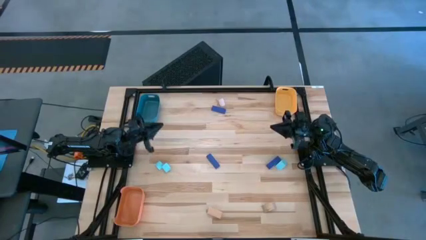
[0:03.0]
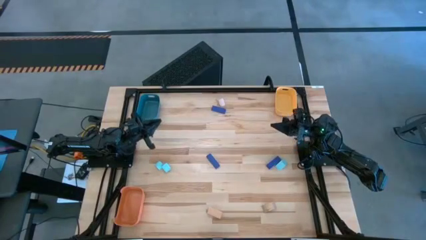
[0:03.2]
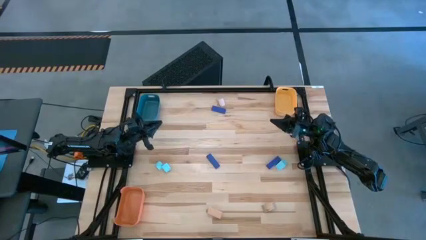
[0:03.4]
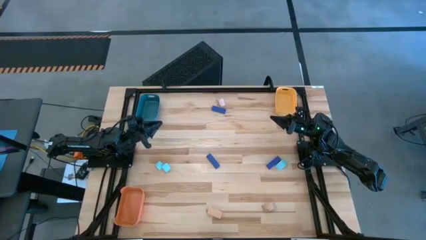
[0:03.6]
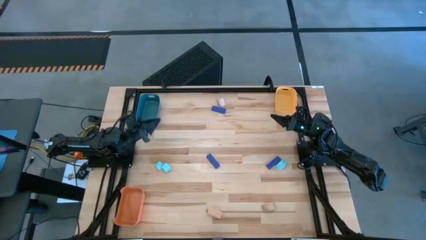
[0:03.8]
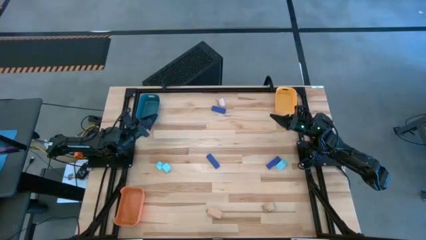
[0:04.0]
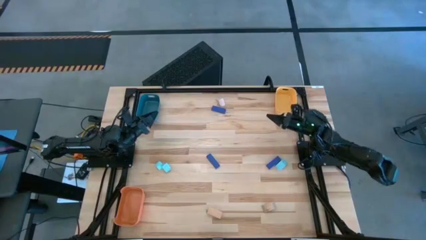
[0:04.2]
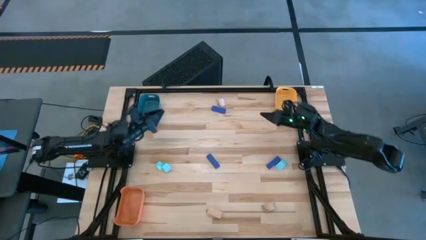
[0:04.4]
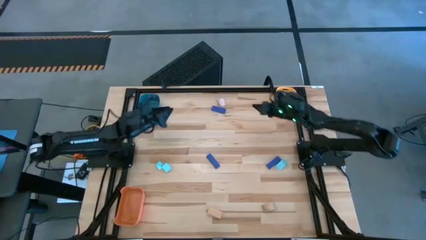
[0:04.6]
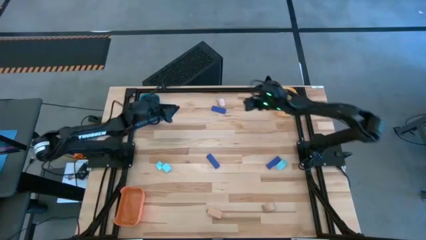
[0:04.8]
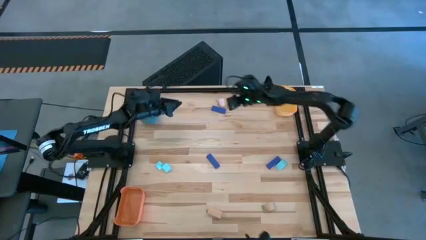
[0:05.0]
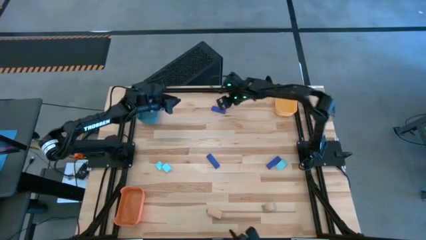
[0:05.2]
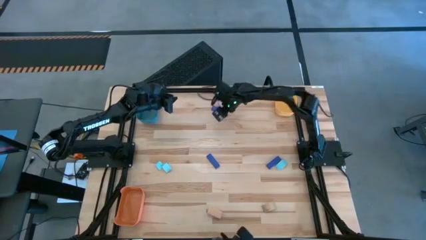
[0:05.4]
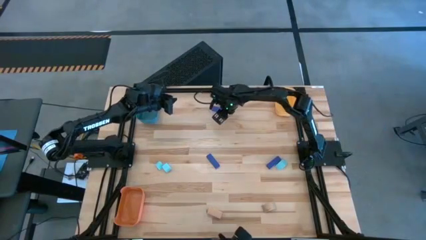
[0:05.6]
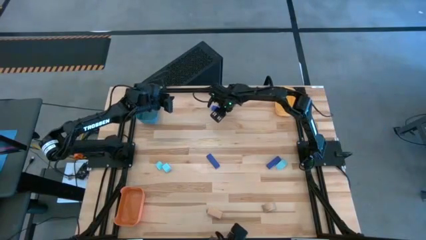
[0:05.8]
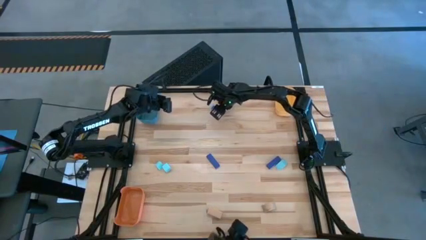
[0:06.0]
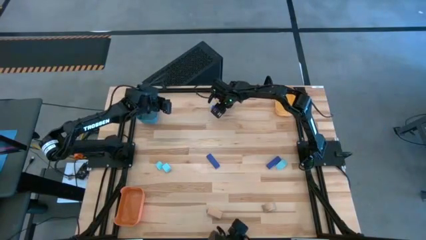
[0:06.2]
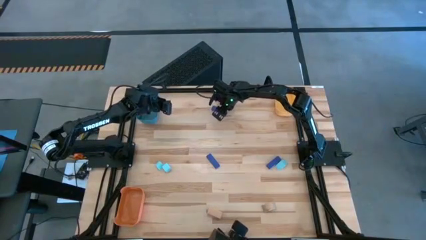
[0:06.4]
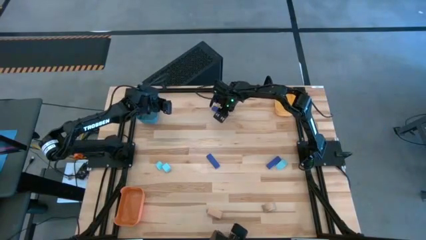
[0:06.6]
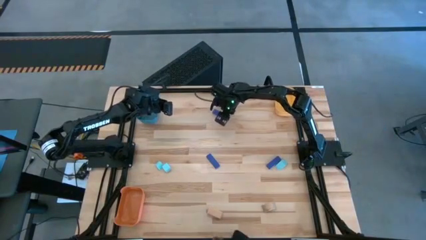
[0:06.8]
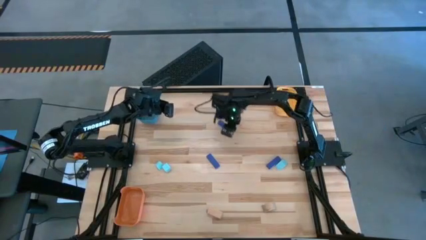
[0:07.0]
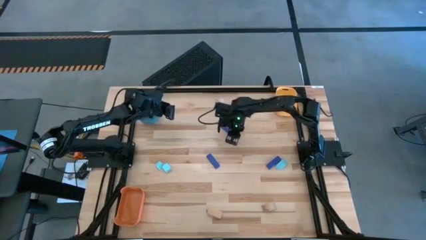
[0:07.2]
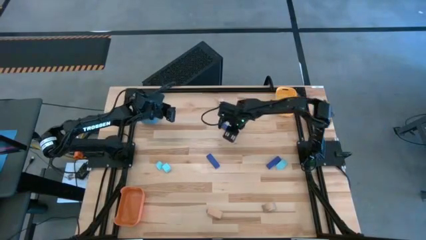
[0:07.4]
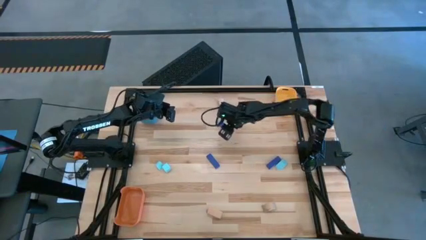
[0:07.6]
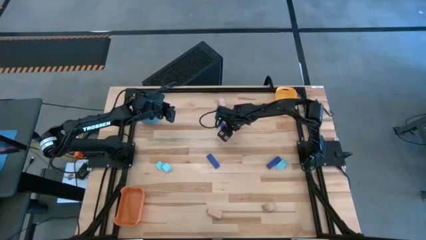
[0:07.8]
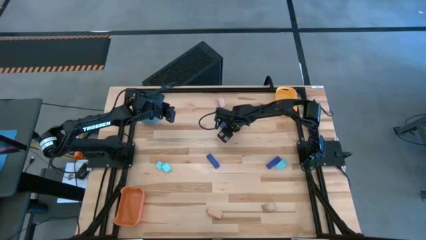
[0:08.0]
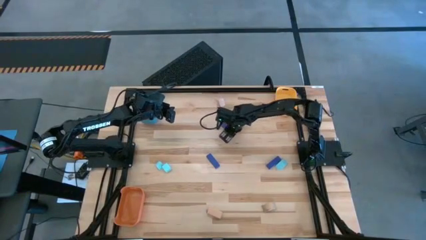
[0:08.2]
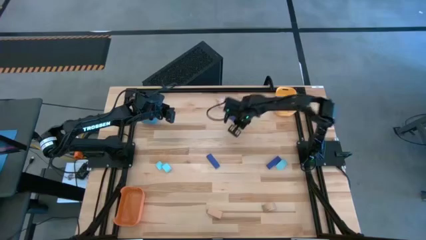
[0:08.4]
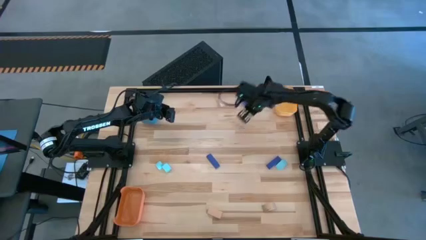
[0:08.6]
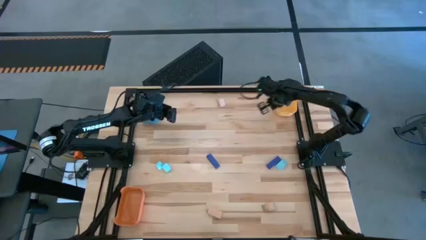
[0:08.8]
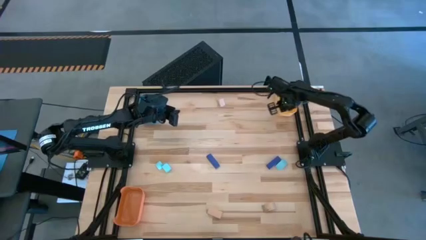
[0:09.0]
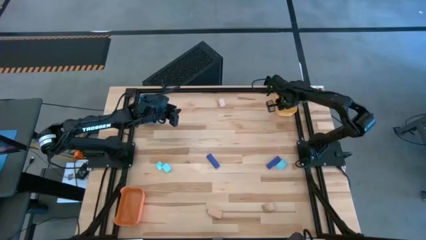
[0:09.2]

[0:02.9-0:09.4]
Task: Sort & place blocks by color
Put the top blue block into the yellow bin

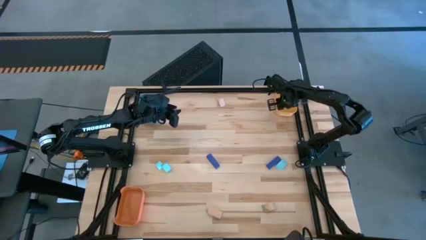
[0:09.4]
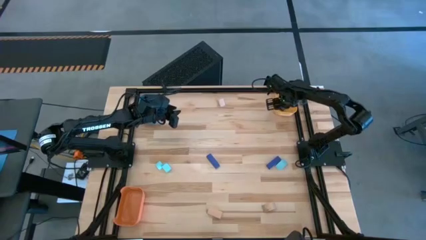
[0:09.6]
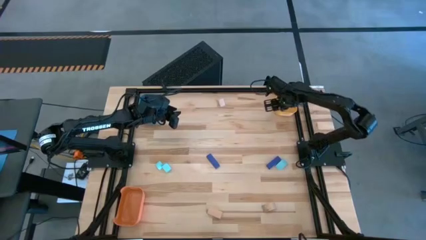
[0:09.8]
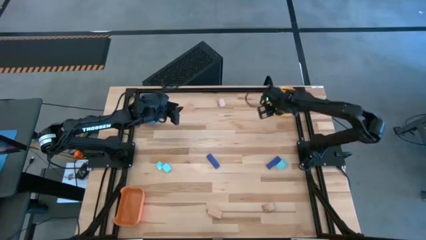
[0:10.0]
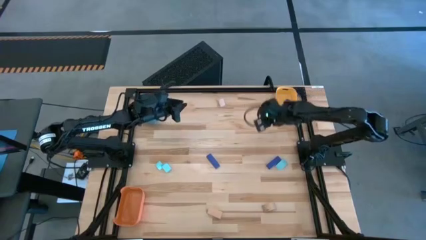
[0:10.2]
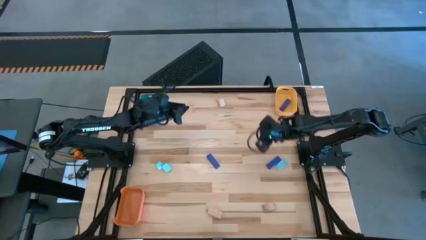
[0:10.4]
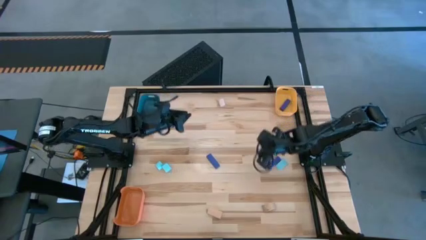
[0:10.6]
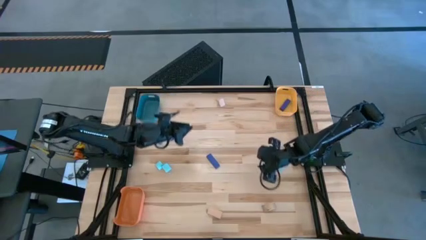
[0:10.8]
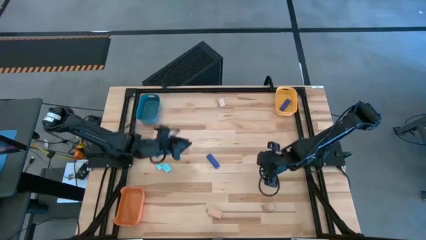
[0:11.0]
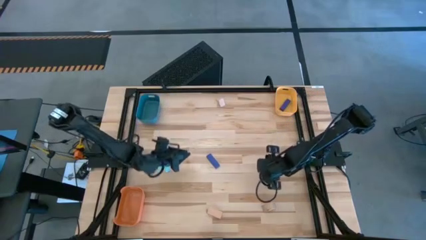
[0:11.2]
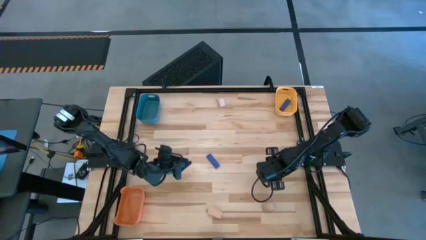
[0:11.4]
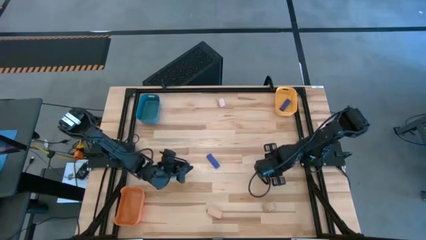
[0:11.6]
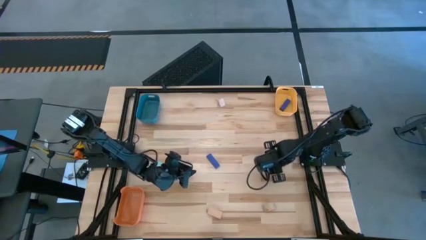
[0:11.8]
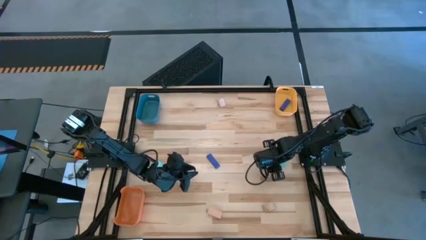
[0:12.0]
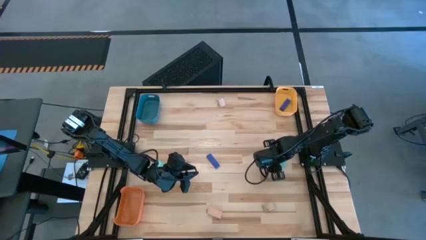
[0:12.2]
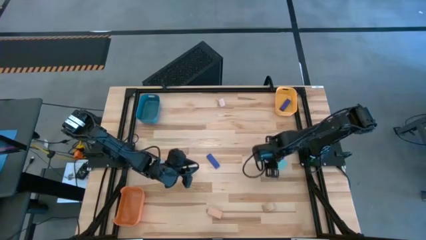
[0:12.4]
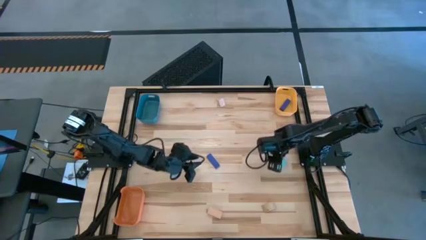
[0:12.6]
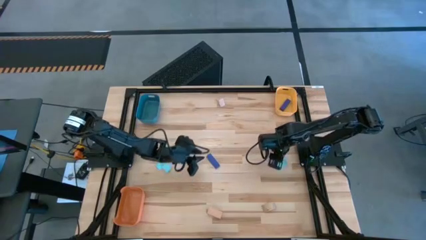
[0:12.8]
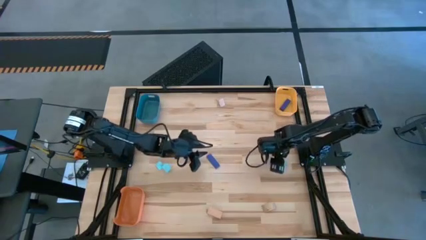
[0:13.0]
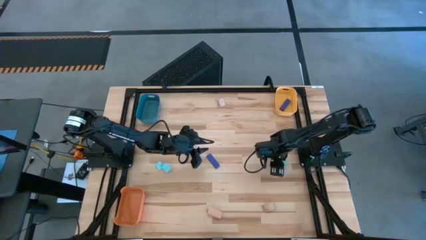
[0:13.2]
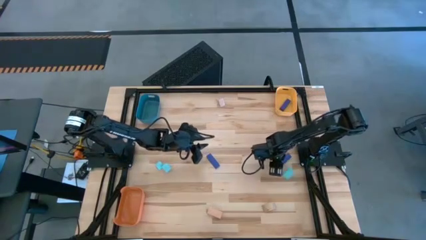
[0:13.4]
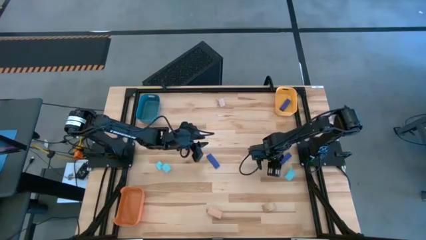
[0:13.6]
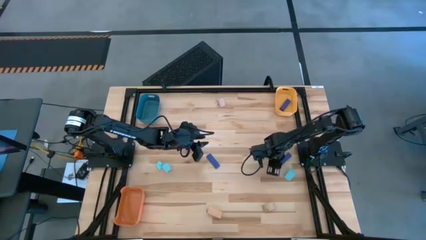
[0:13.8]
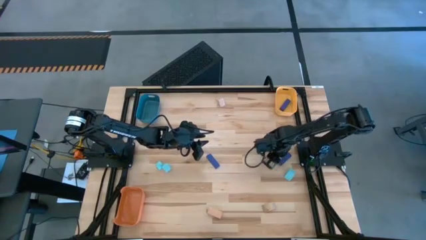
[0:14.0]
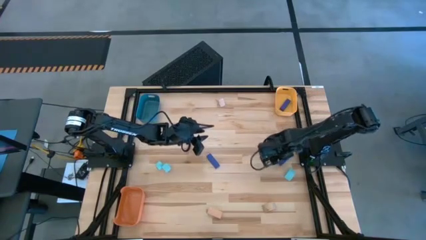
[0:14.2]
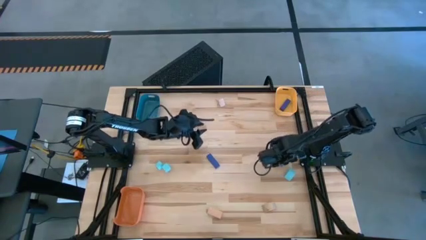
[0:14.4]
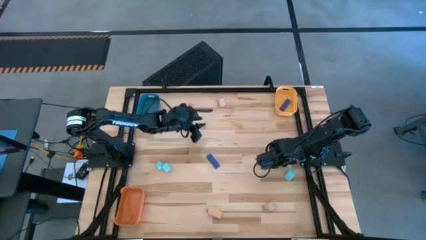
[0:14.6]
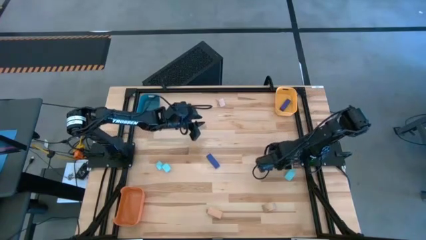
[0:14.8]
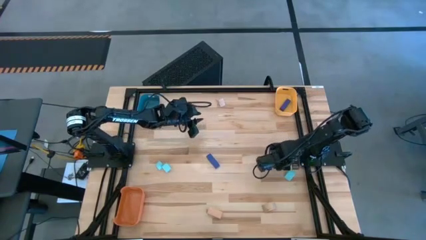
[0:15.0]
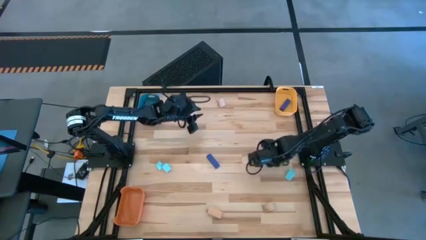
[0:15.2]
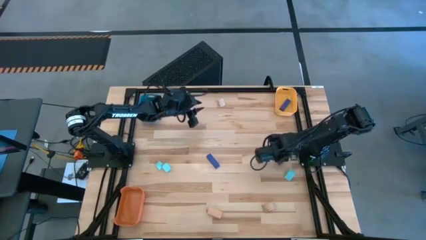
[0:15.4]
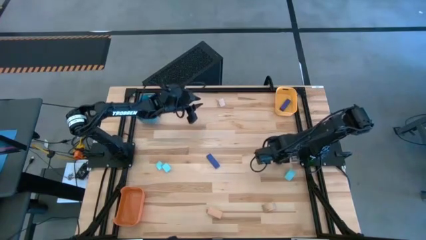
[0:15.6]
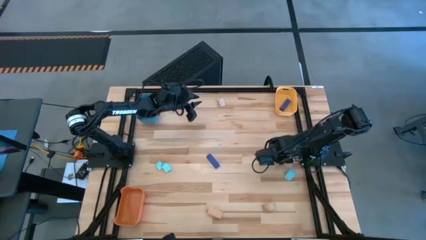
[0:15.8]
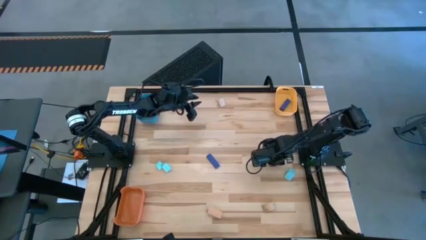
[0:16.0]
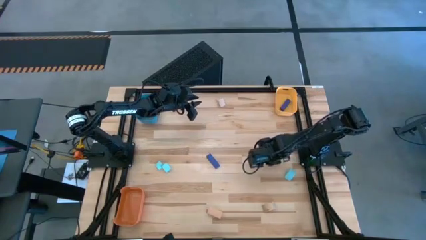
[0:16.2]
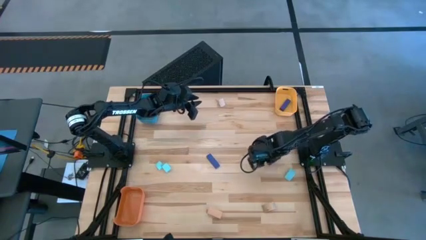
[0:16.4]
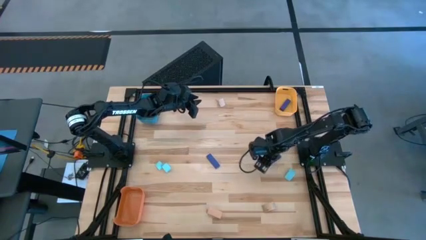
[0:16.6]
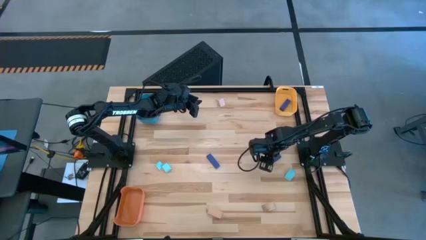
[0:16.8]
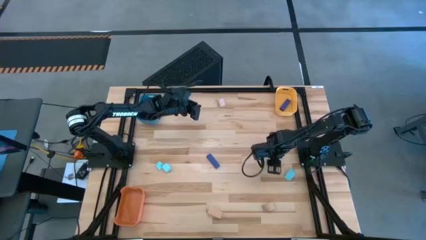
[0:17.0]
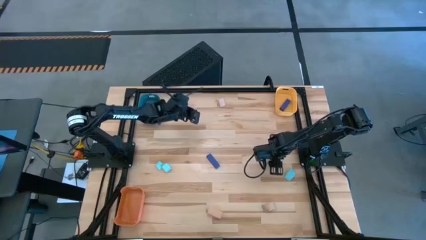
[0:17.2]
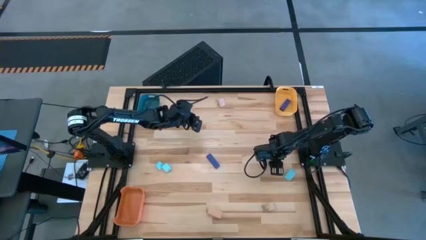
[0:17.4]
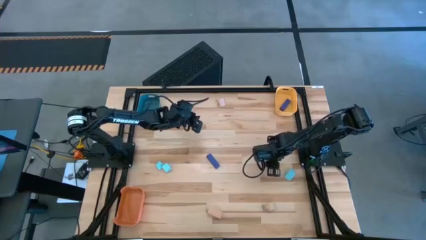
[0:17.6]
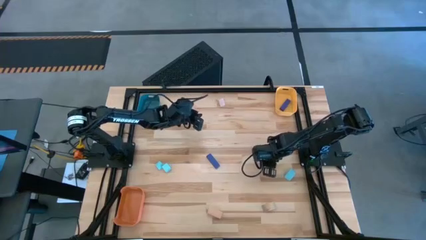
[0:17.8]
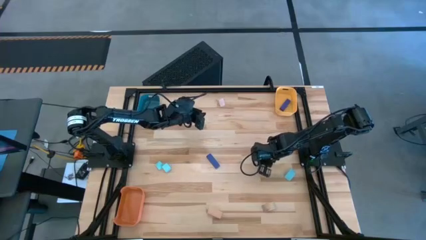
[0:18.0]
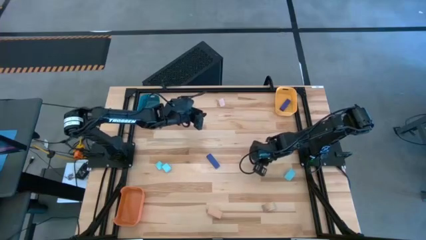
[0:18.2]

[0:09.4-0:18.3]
Put the right blue block into the yellow bin
